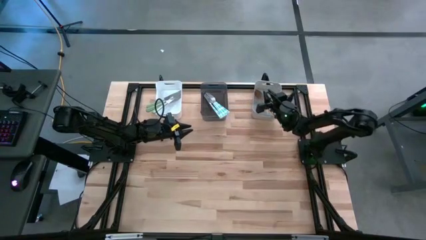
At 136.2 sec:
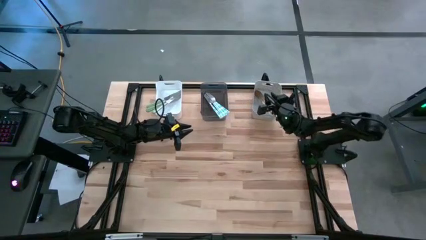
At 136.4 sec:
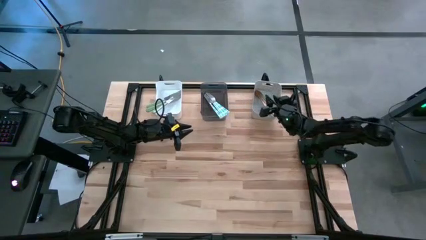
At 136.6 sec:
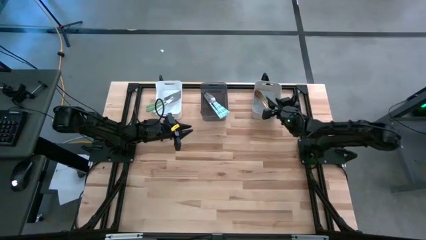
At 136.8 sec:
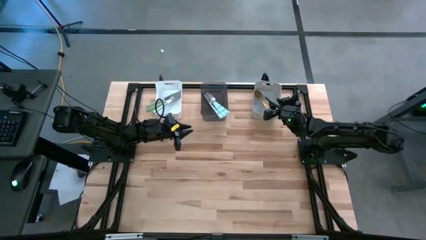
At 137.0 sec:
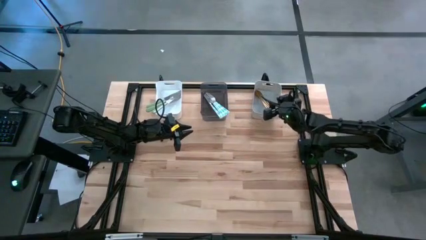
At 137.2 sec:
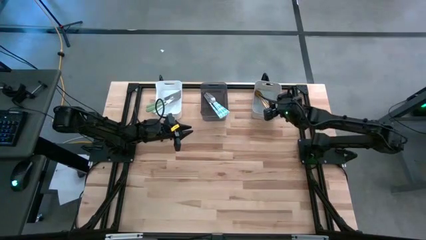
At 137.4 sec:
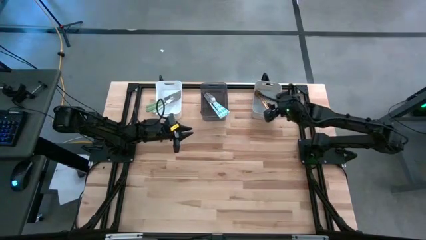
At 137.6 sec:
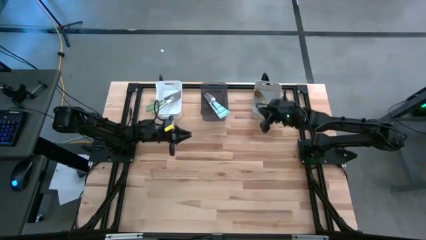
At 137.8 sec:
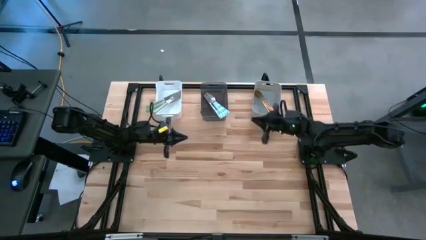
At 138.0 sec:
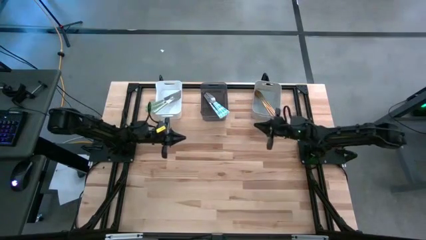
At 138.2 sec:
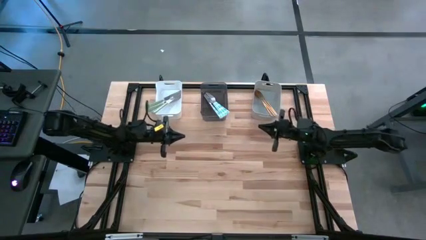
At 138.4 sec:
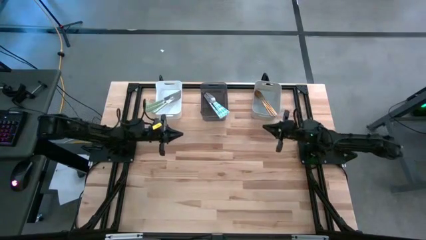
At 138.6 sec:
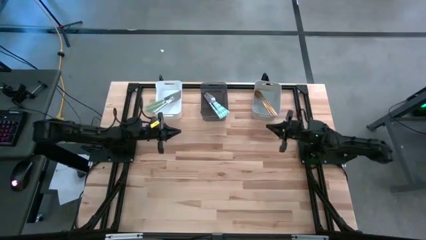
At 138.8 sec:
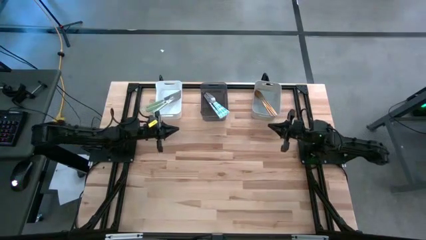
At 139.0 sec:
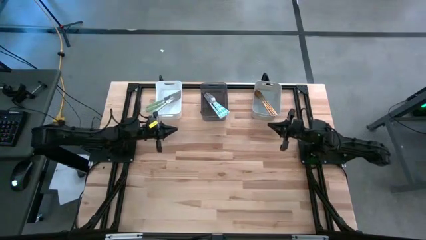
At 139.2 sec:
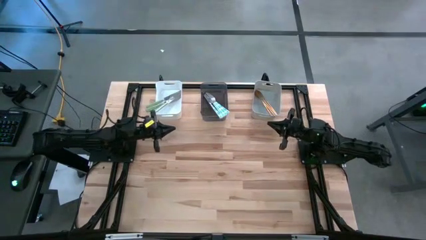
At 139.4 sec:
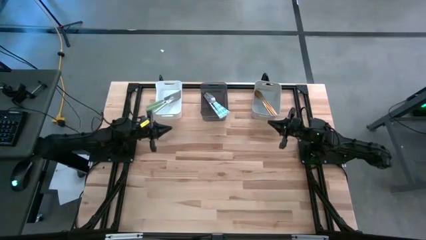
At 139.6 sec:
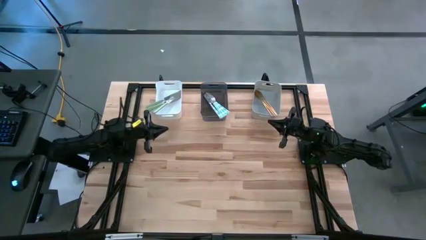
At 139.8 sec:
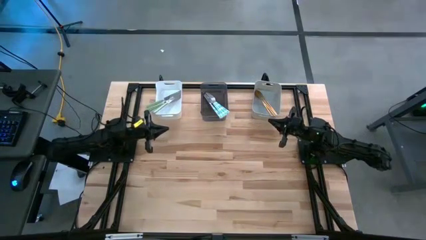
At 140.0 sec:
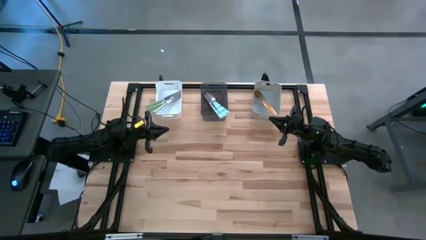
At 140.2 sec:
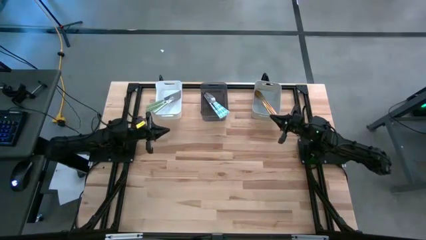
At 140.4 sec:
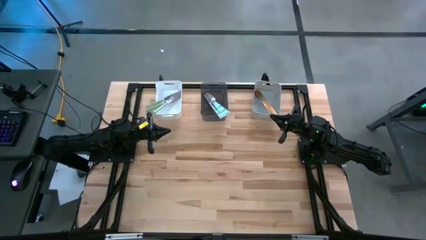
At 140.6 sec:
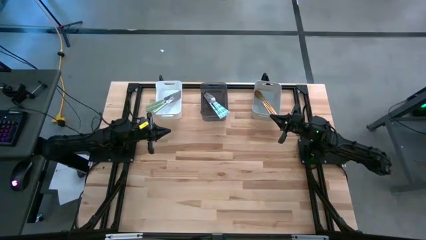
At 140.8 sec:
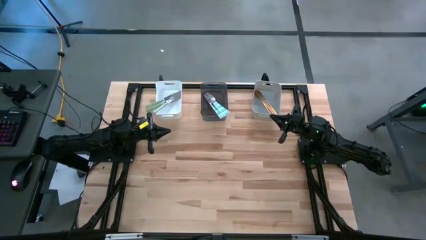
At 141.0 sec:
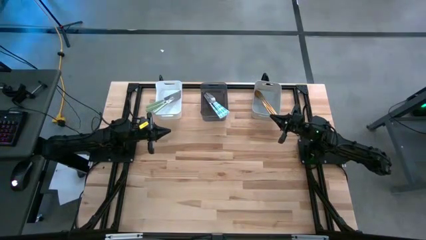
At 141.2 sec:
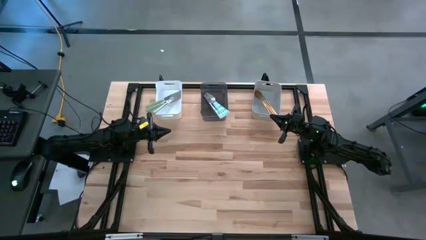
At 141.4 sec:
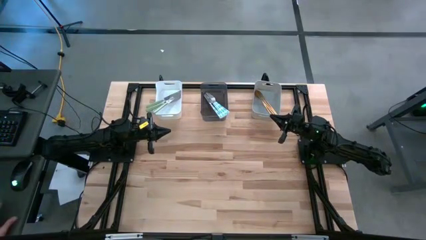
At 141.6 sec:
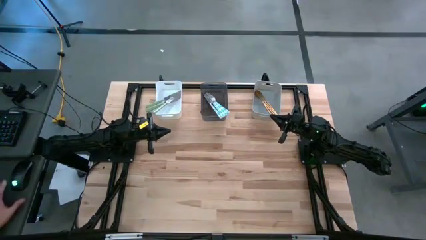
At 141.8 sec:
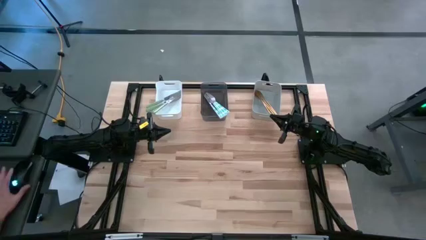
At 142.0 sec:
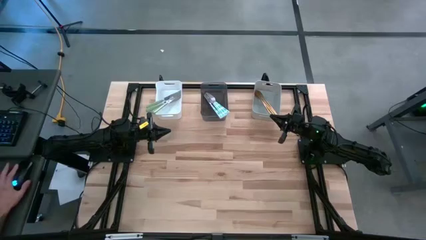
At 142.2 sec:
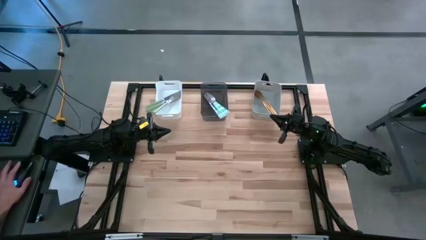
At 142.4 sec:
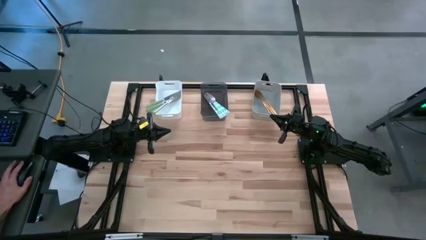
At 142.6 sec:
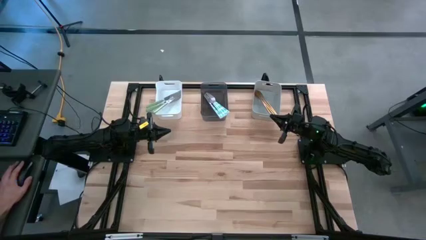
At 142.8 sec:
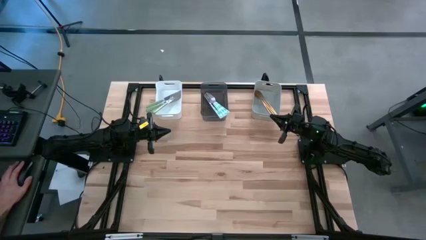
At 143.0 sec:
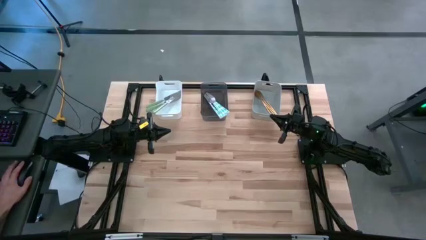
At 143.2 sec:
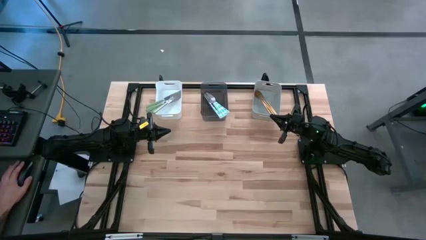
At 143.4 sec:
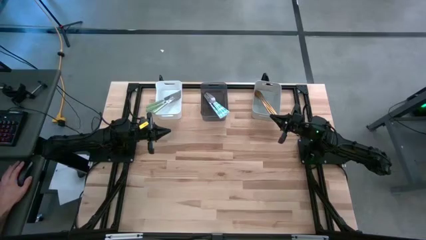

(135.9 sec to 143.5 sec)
Task: Sort silverware by color (type)
Return to Home Position
